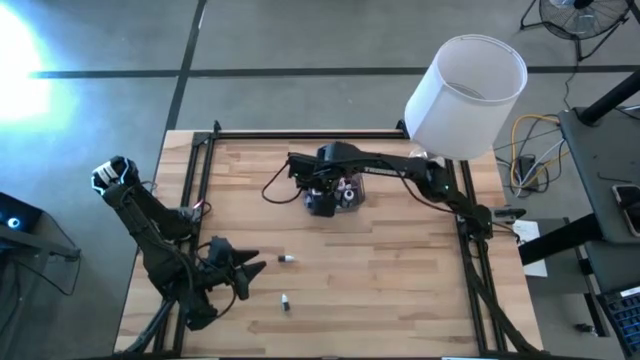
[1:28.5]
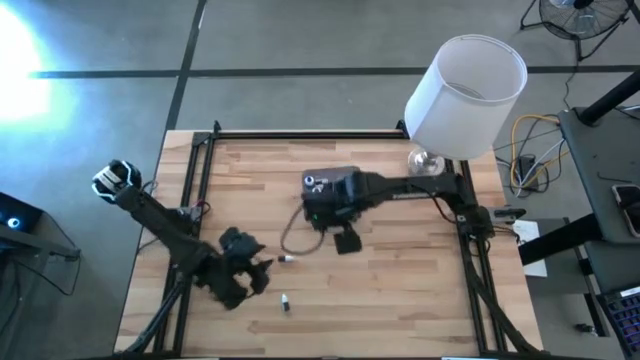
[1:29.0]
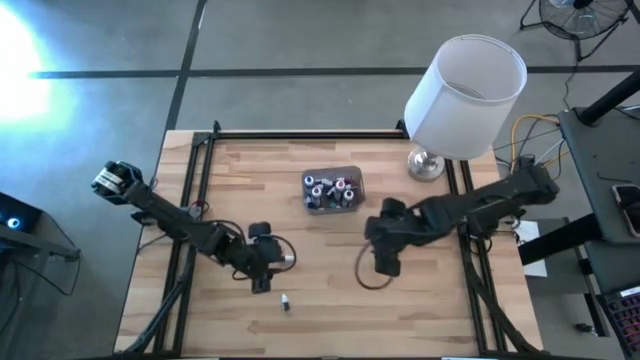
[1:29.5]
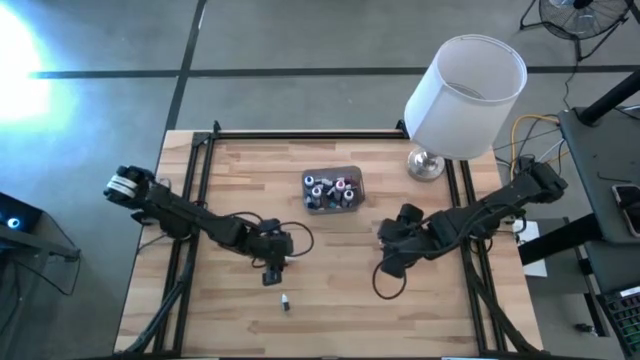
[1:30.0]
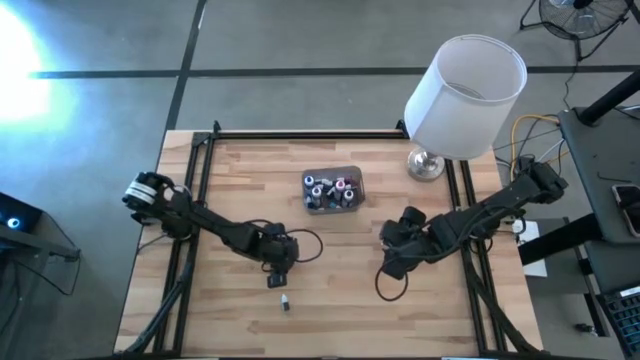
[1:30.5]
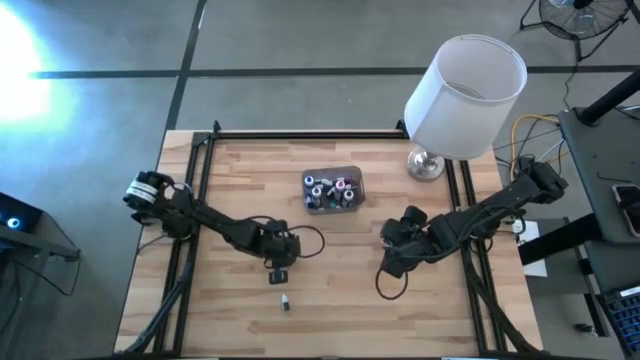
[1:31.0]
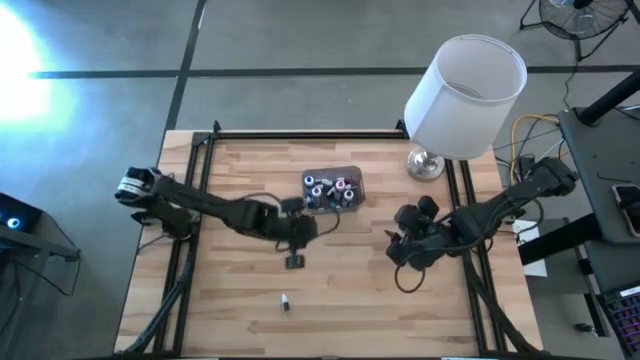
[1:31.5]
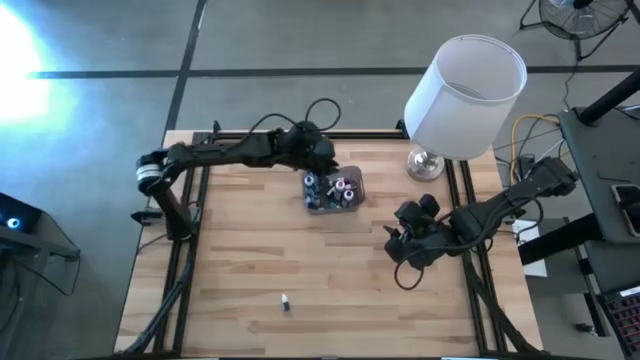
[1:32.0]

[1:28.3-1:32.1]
Task: Pick & Place food coloring
Put the small black food coloring bottle into the bin

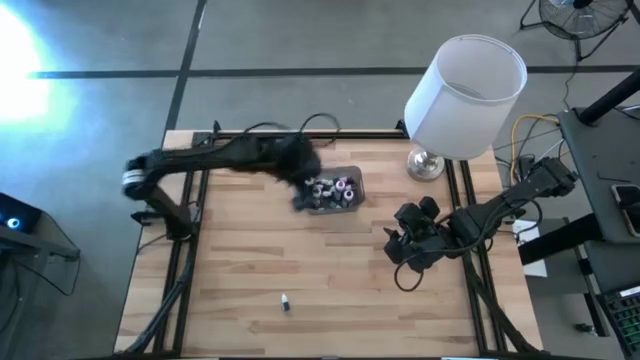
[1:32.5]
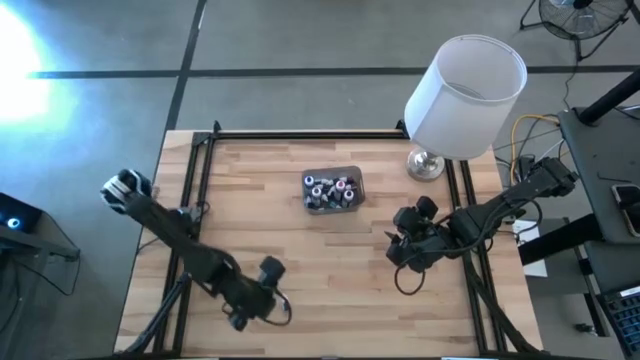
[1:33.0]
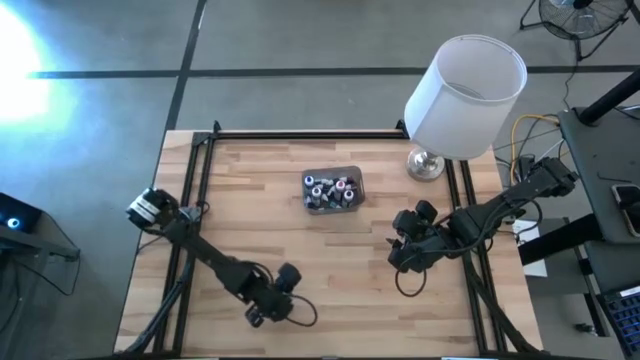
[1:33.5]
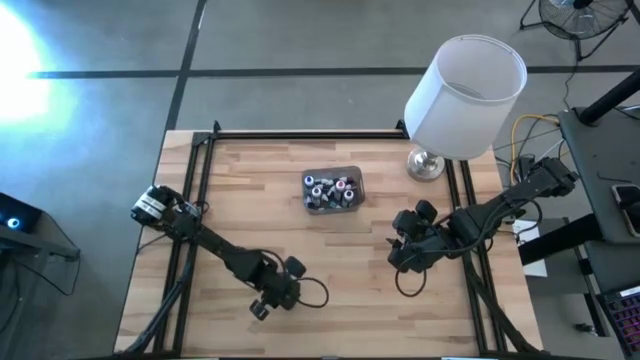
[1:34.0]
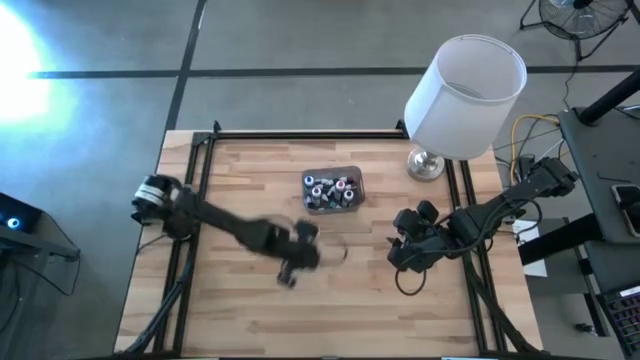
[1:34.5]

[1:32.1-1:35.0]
Put the small black food coloring bottle into the bin

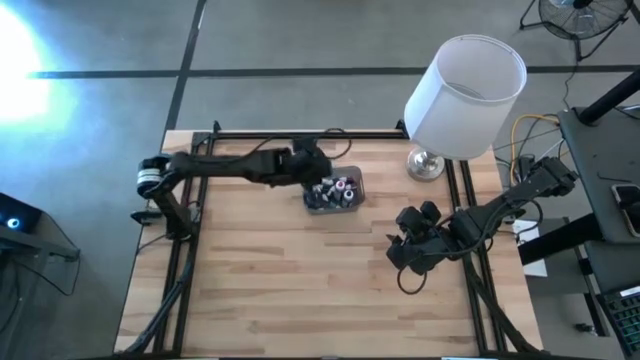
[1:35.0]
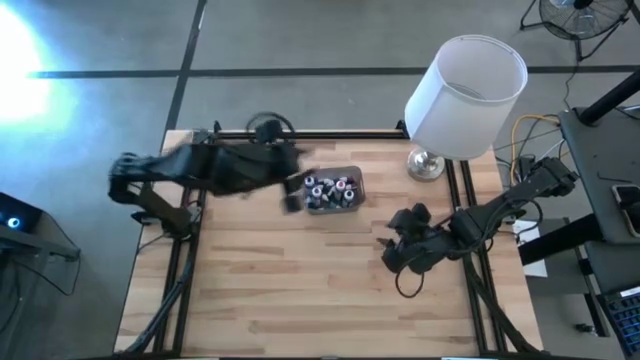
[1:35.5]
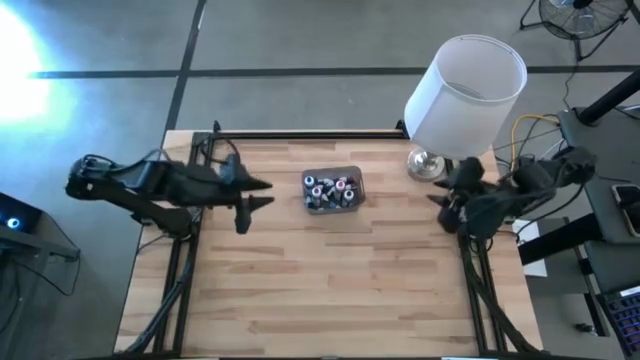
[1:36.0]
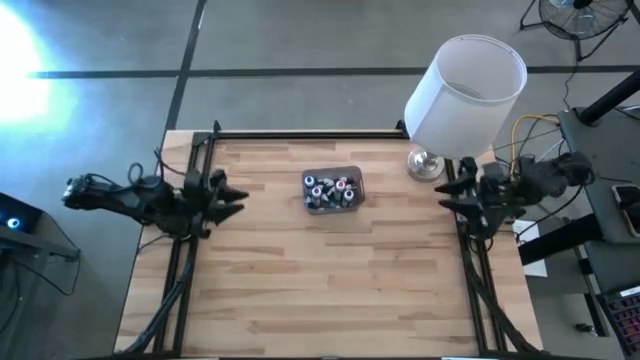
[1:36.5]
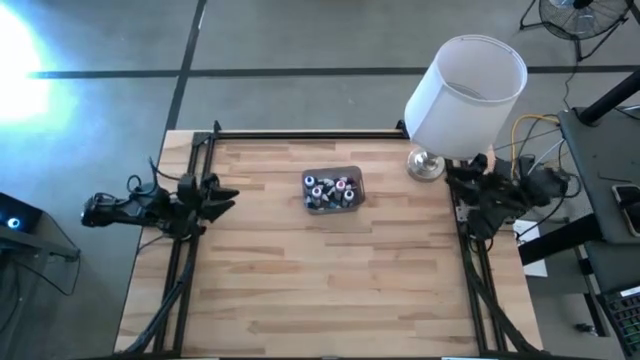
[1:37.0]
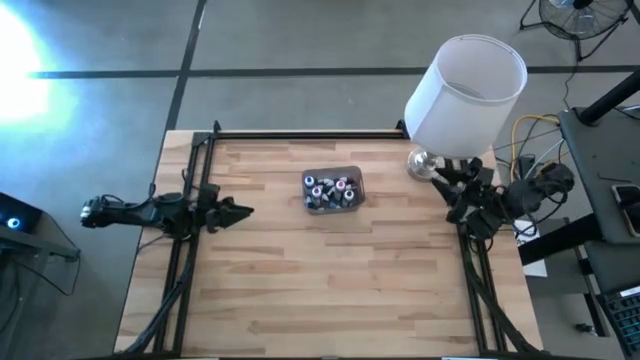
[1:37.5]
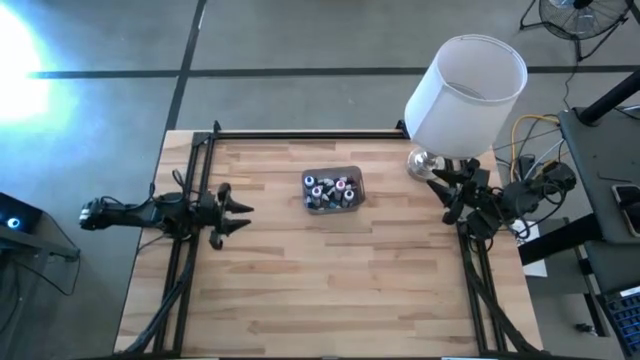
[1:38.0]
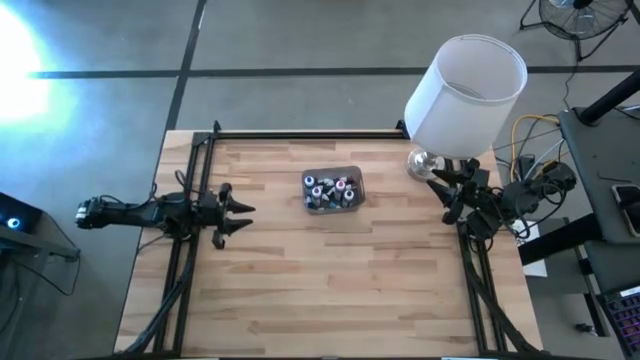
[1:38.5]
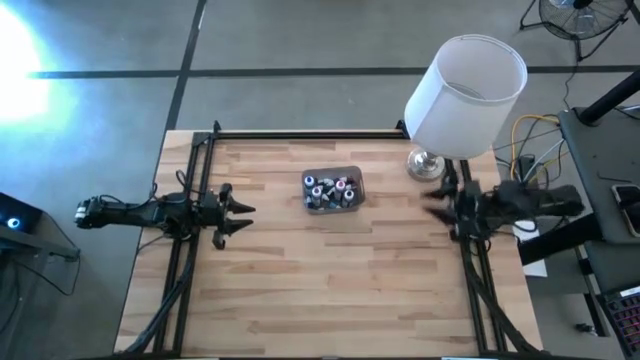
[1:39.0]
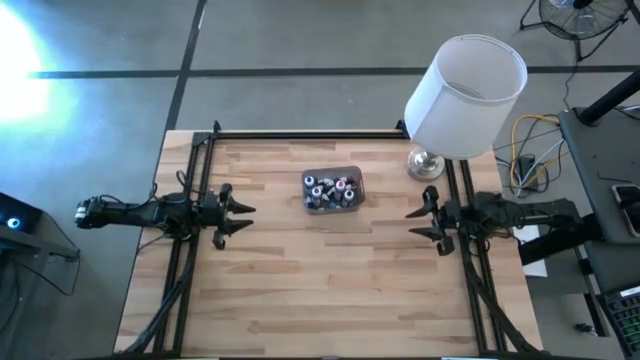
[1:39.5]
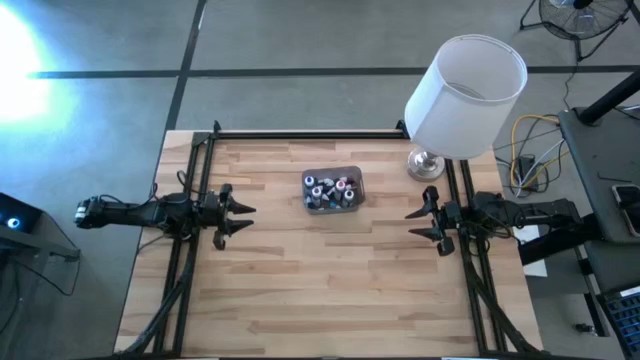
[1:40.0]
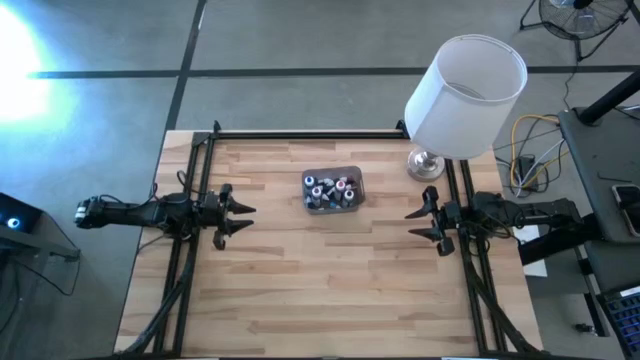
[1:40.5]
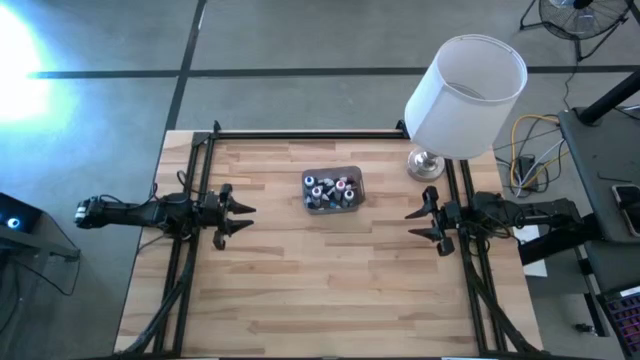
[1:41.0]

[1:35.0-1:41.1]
Return to Home Position

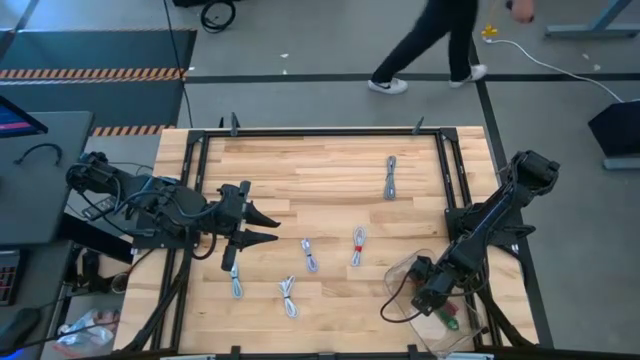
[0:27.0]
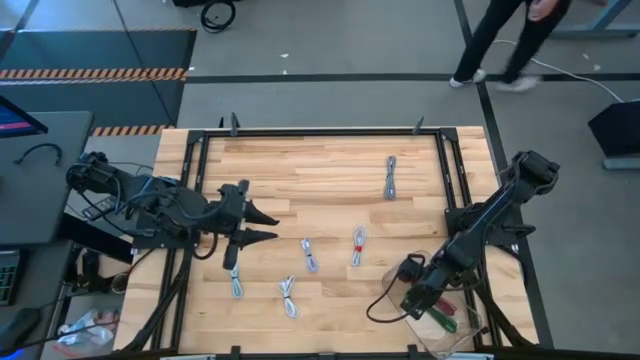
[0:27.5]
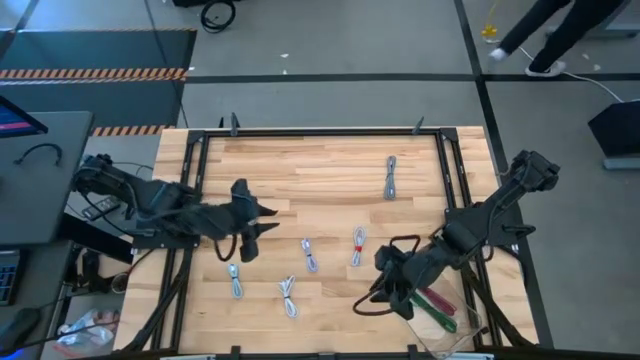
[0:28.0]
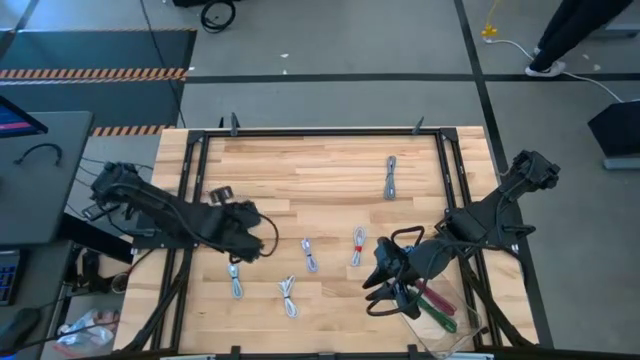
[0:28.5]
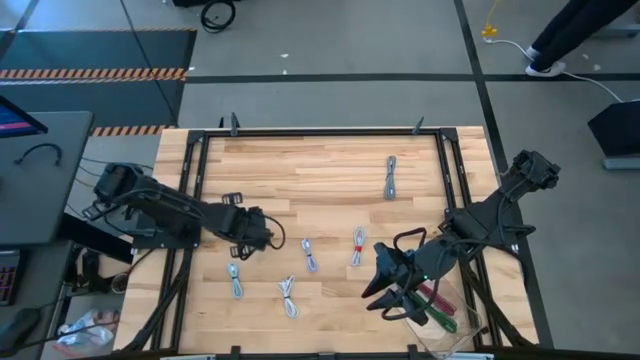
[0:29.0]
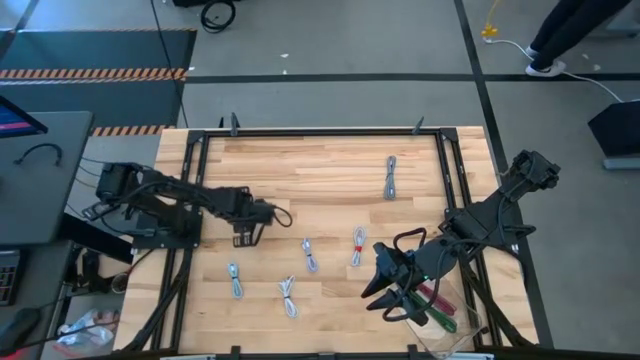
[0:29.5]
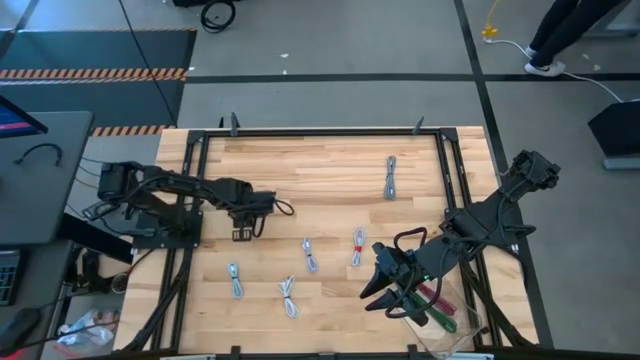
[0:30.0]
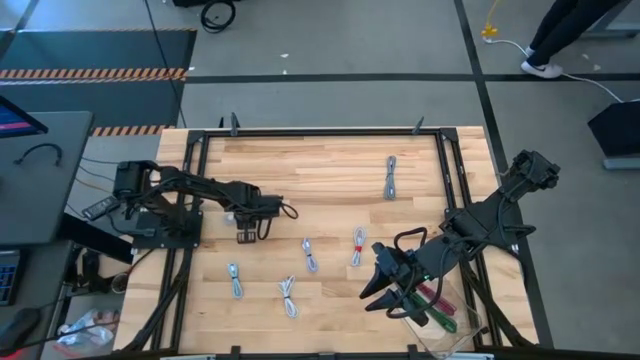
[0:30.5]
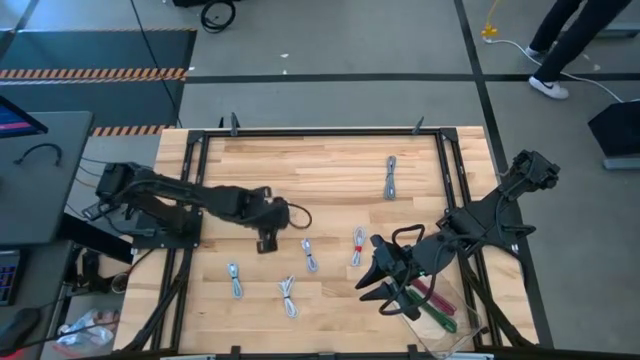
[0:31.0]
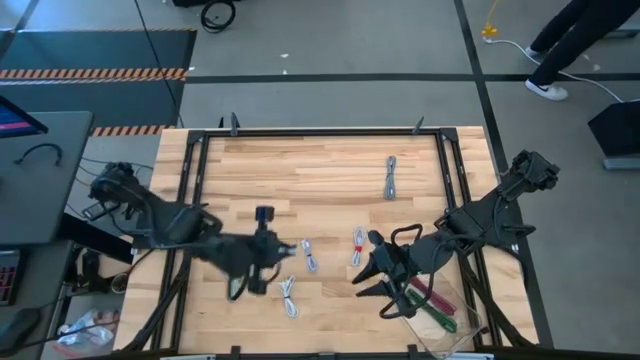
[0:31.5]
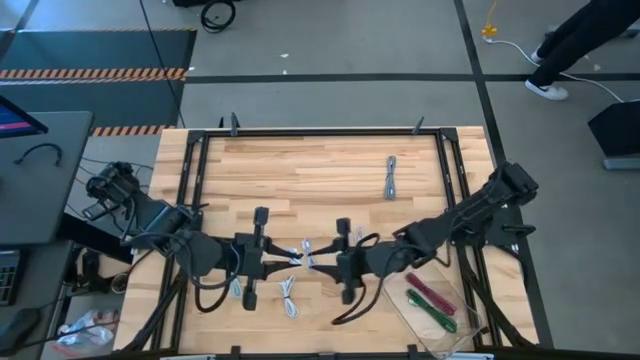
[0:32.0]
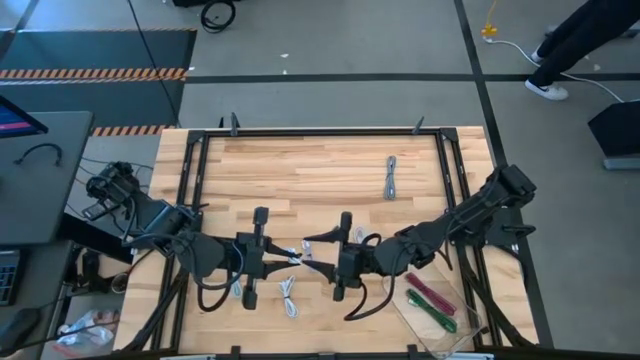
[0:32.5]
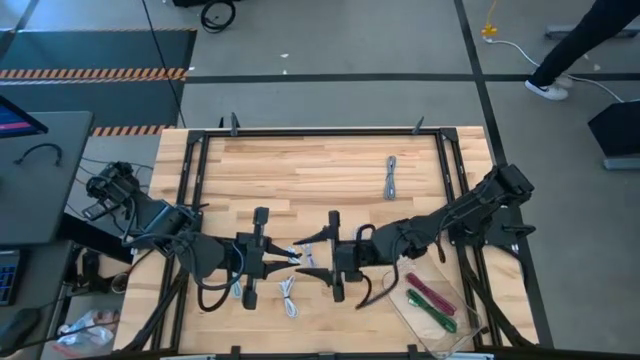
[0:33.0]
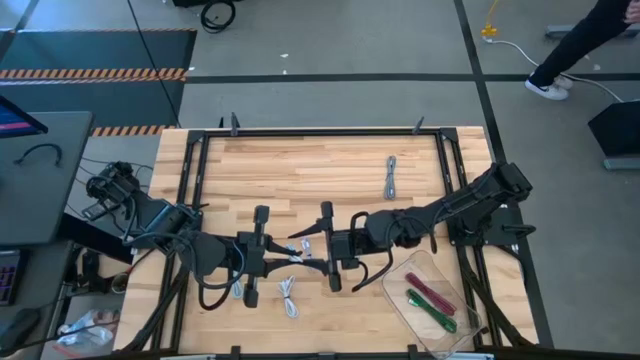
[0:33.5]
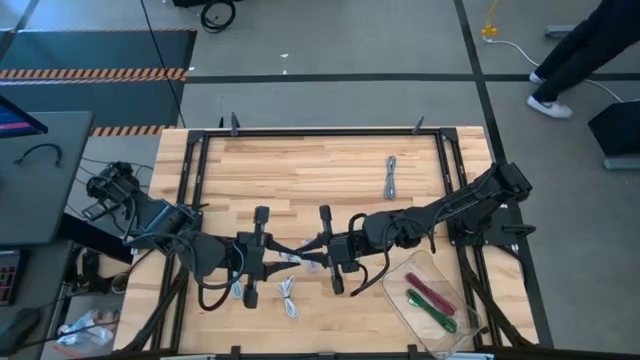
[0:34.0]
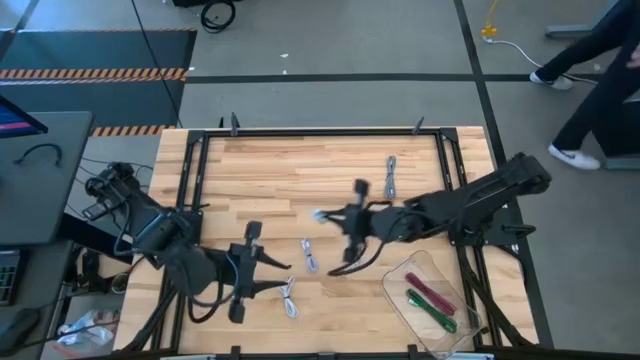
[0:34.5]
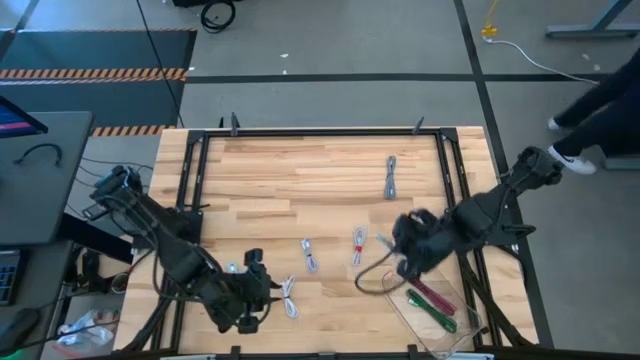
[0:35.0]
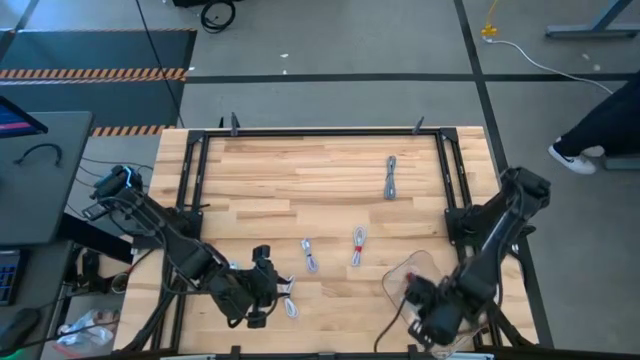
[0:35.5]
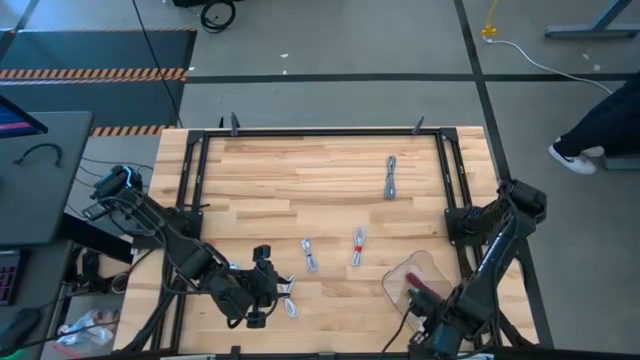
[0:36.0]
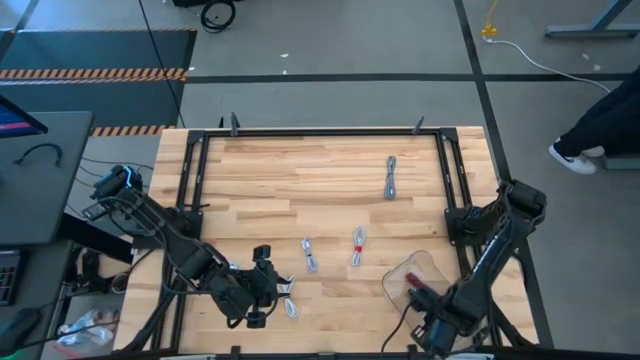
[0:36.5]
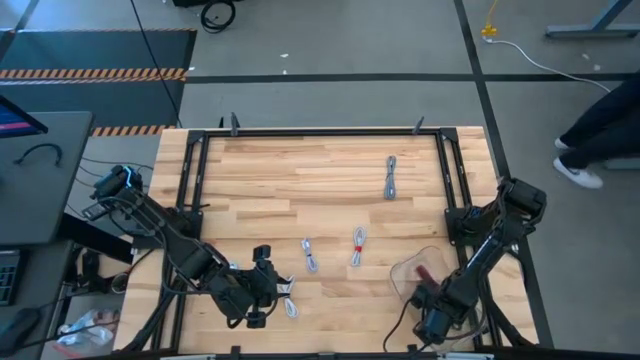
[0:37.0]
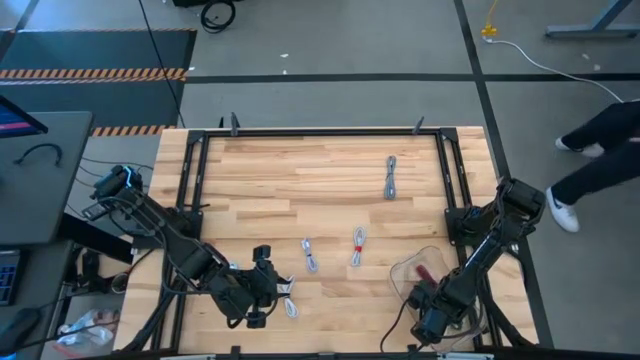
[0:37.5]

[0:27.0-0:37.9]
Task: Pick and place USB-C Cables
Put the top white charger cable into the transparent bin
